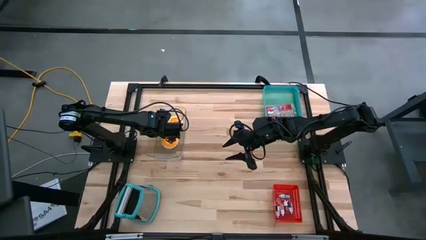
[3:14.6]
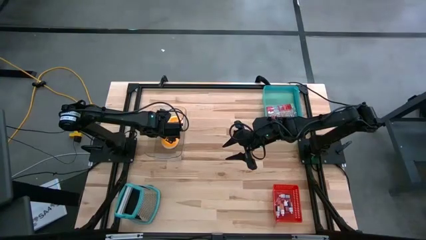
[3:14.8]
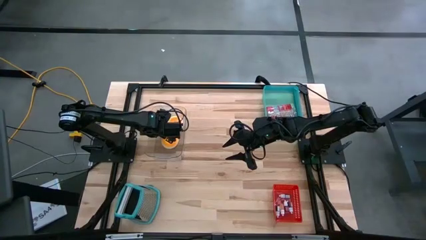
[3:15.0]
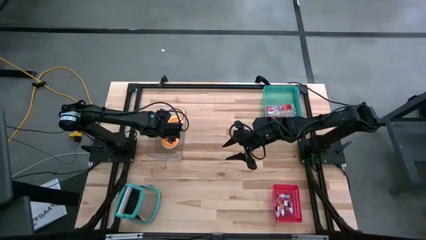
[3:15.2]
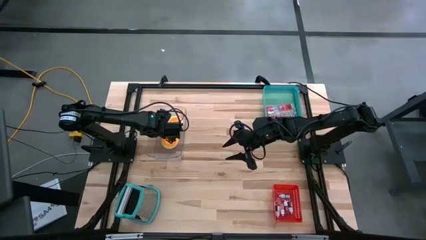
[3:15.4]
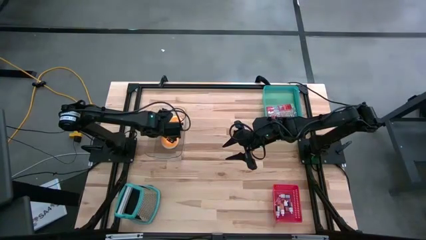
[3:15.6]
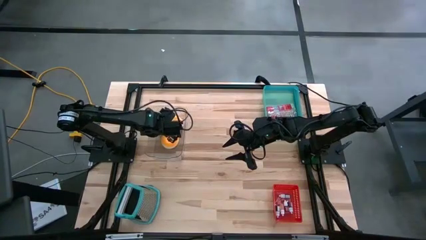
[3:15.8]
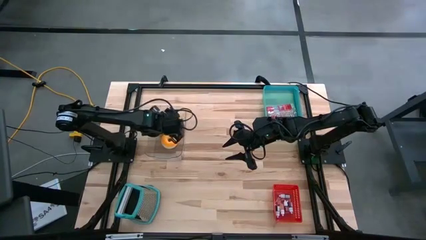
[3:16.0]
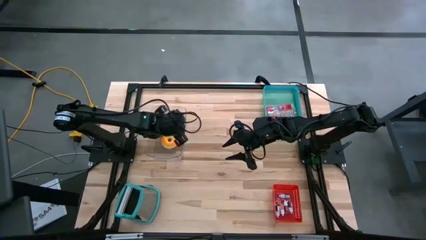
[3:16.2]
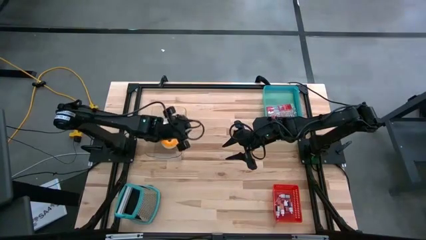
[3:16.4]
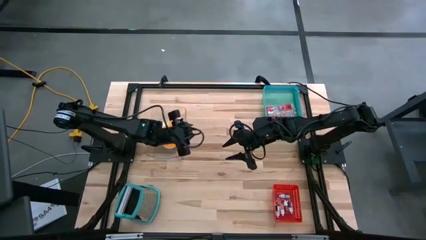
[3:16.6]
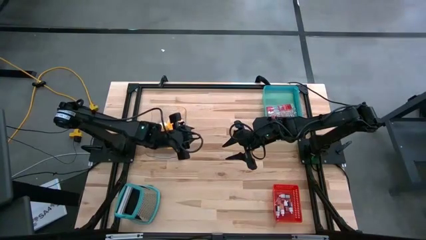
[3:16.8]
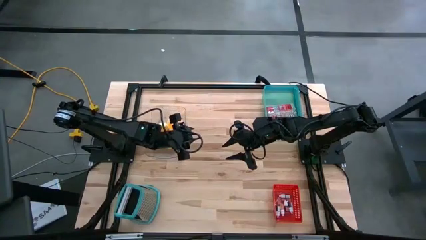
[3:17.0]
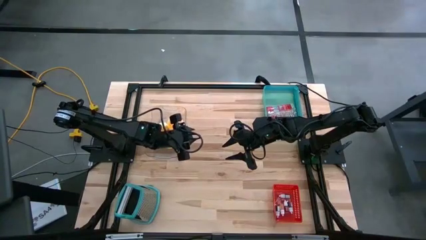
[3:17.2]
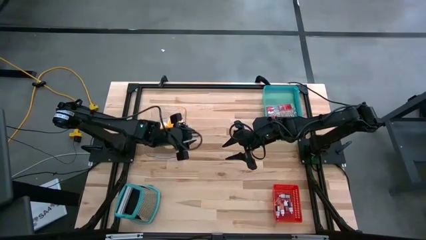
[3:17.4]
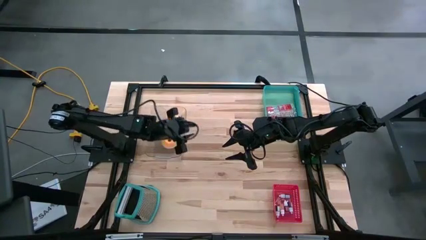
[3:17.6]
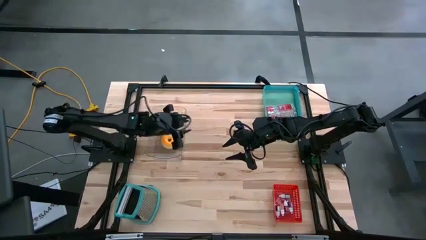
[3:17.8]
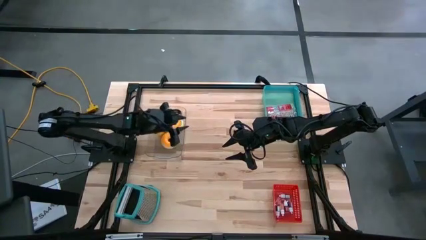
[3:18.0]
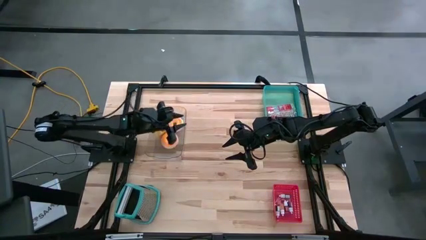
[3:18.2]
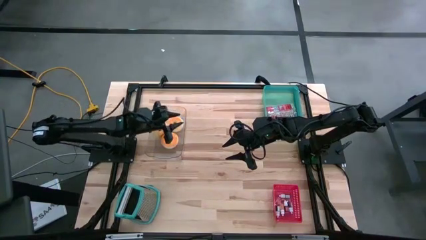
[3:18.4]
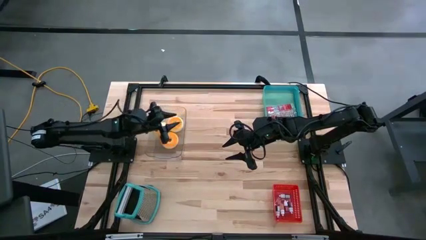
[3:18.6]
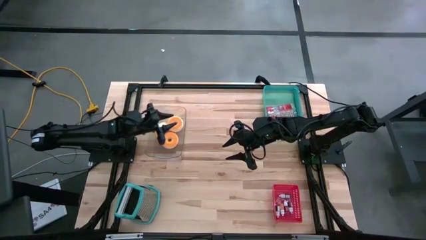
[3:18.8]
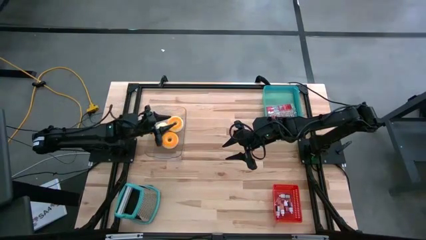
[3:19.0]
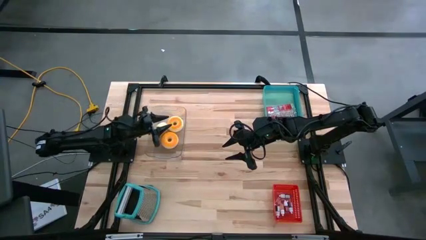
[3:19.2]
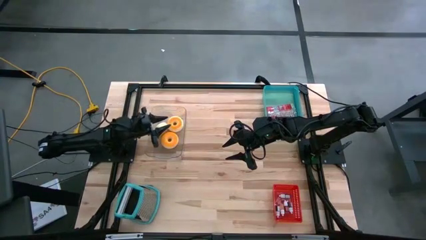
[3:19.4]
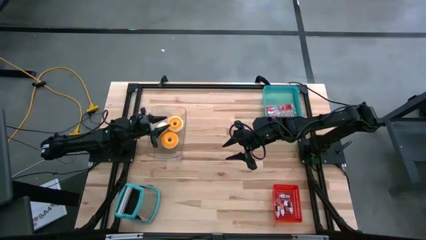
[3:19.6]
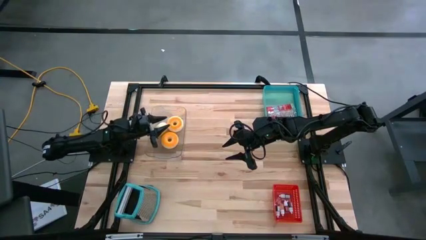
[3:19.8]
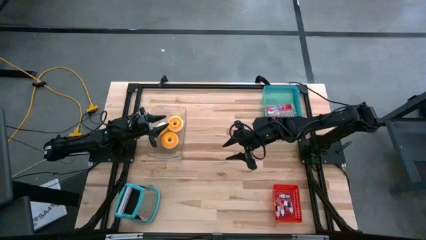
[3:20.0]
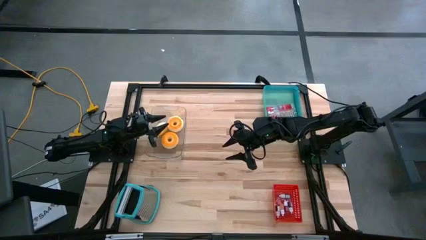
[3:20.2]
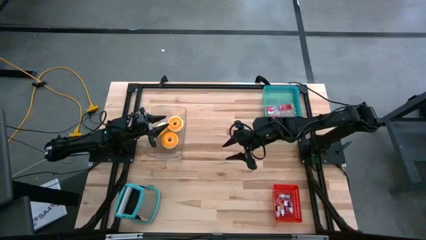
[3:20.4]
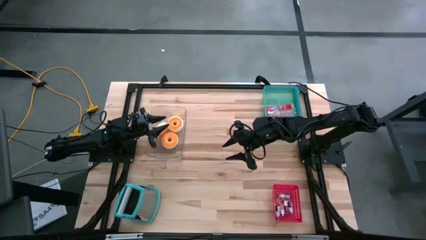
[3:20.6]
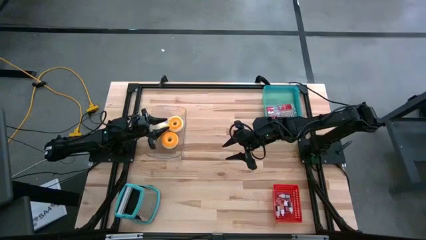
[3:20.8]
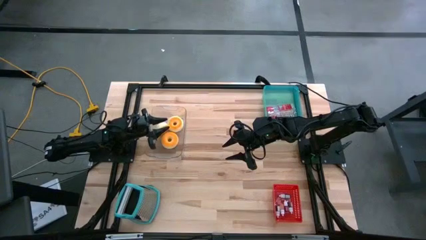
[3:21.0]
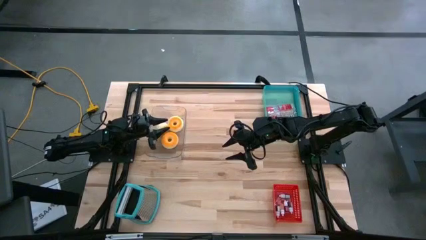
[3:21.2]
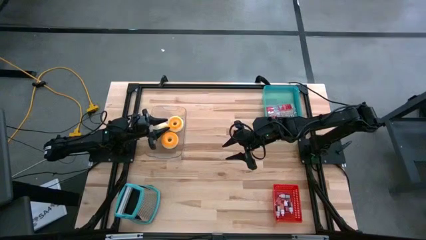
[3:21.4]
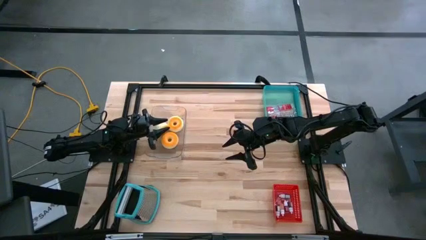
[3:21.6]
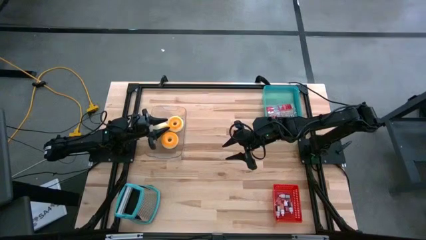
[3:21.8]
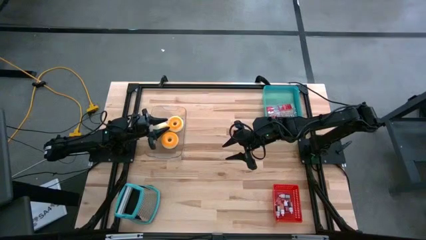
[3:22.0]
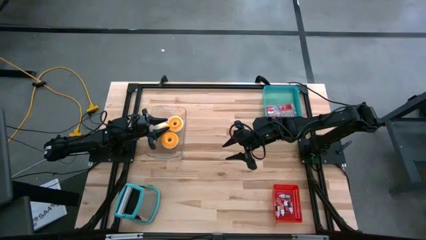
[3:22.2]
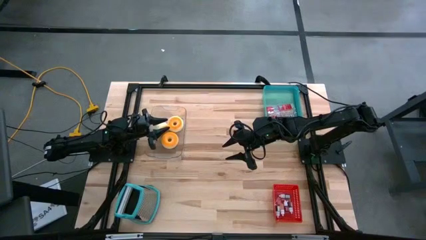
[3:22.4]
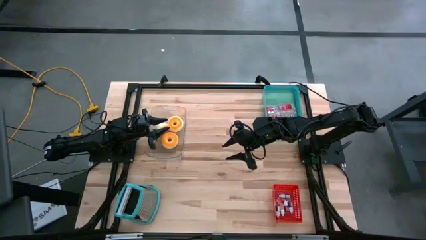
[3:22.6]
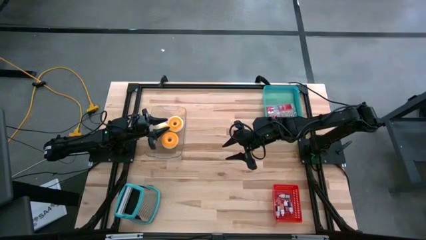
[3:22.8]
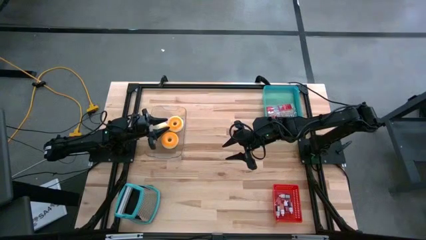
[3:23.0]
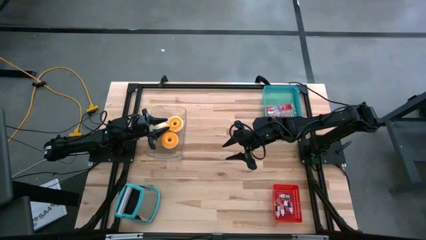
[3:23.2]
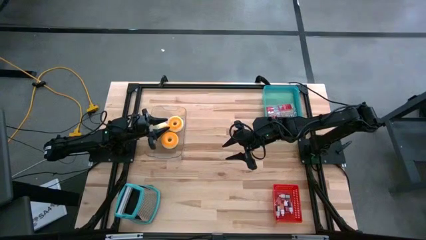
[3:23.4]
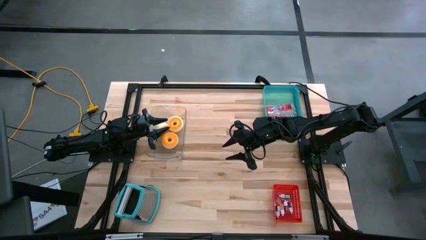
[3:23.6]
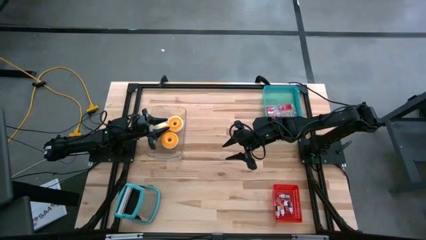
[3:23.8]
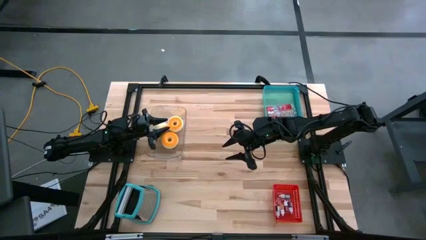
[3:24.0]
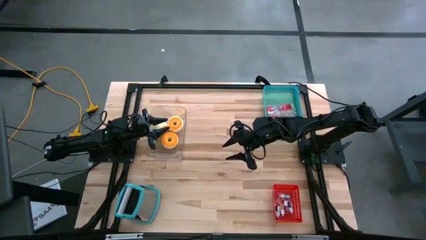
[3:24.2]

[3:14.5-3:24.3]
Return to Home Position

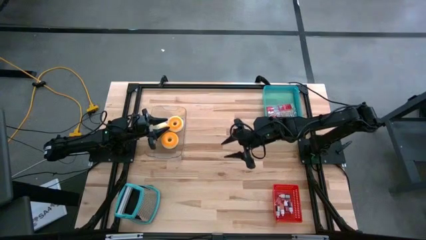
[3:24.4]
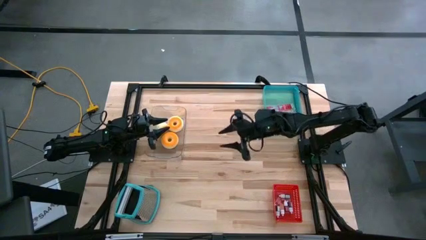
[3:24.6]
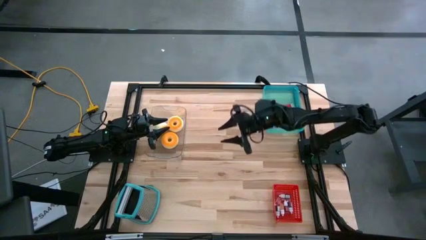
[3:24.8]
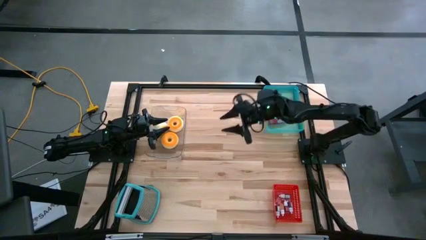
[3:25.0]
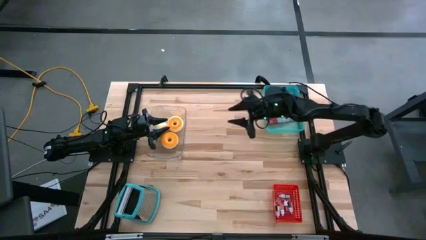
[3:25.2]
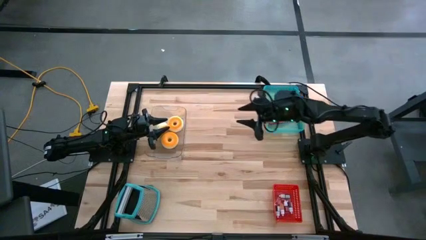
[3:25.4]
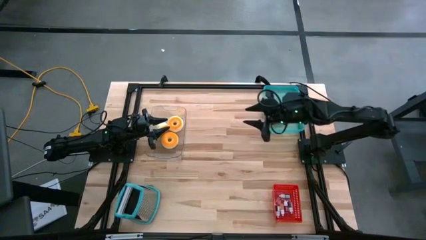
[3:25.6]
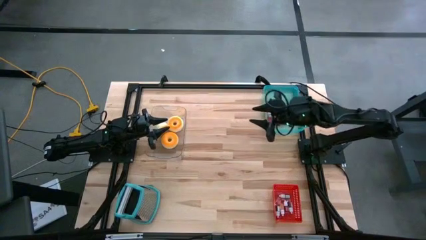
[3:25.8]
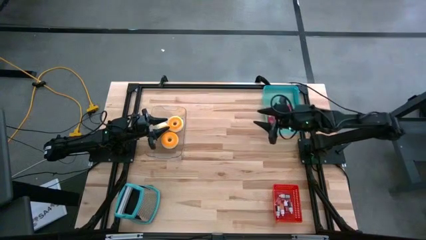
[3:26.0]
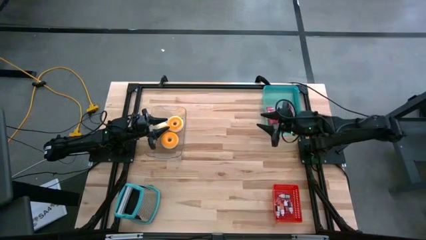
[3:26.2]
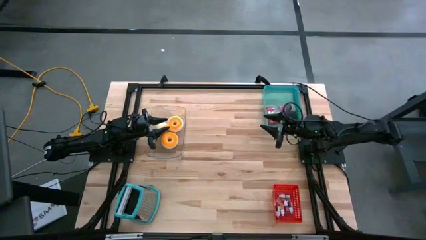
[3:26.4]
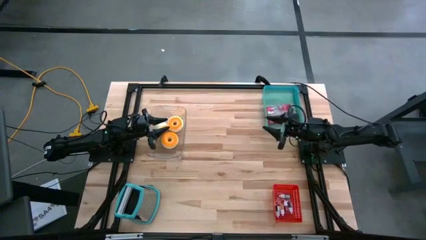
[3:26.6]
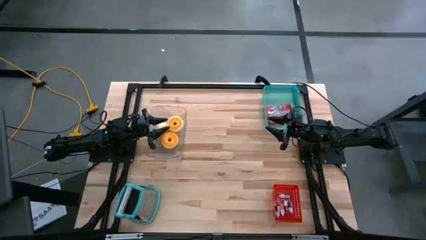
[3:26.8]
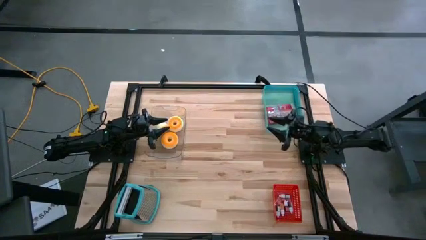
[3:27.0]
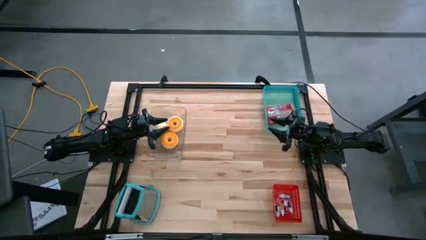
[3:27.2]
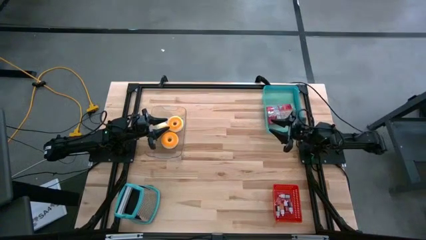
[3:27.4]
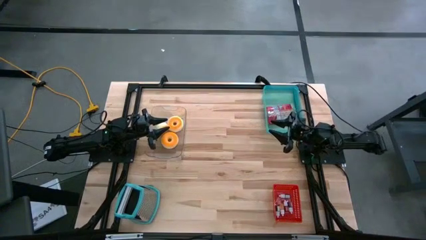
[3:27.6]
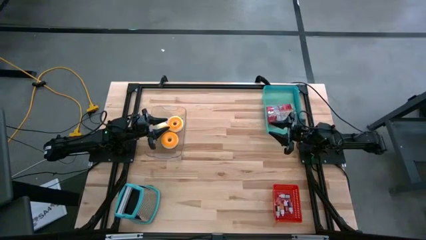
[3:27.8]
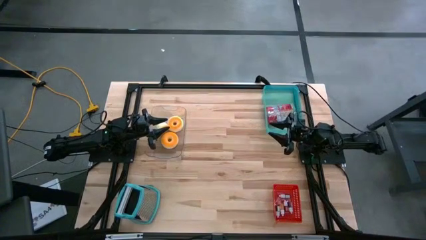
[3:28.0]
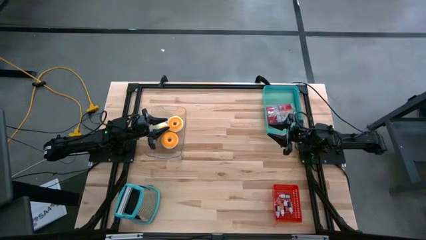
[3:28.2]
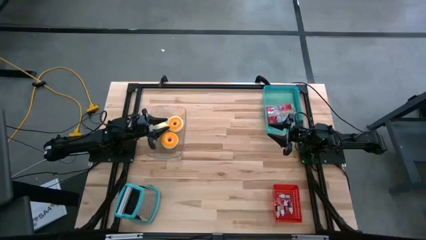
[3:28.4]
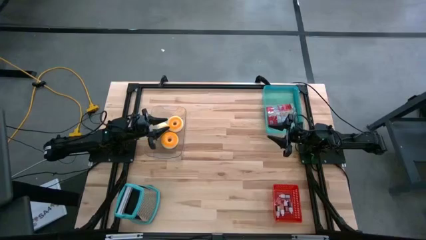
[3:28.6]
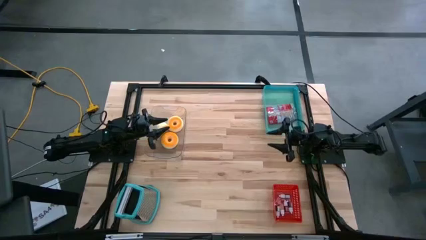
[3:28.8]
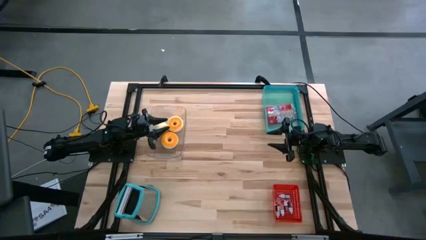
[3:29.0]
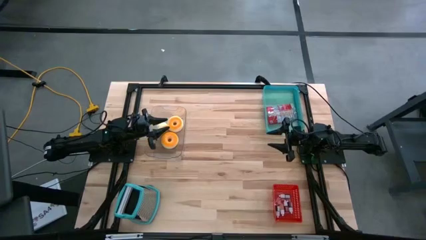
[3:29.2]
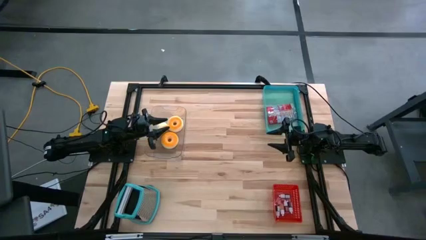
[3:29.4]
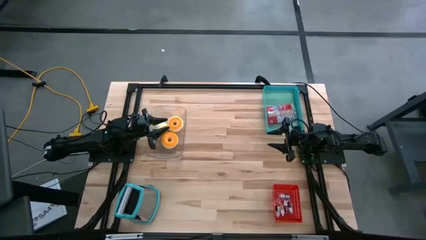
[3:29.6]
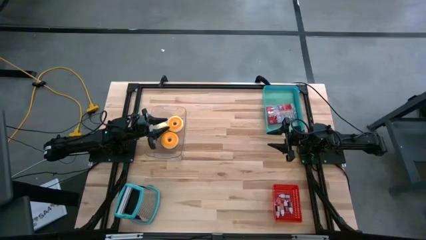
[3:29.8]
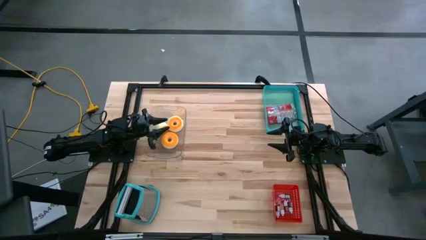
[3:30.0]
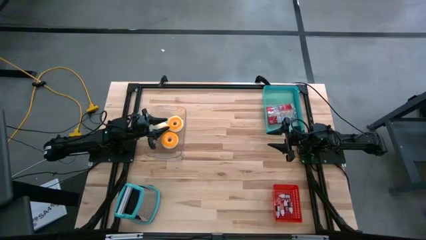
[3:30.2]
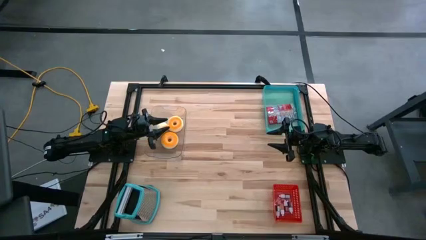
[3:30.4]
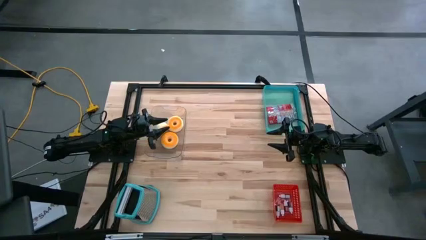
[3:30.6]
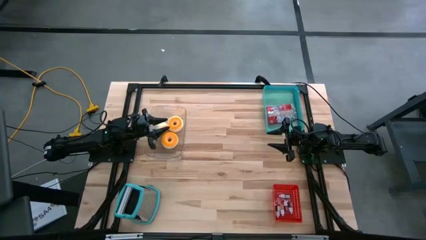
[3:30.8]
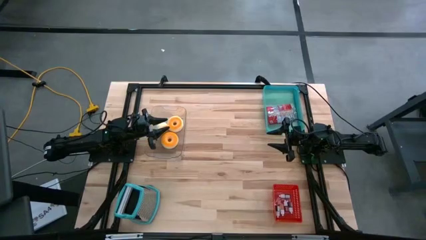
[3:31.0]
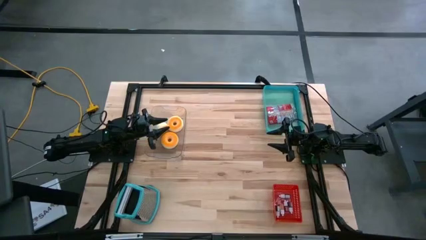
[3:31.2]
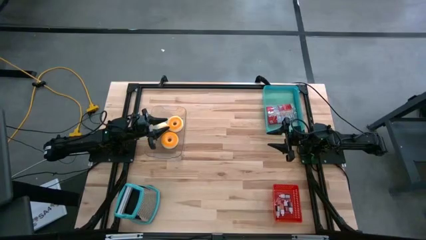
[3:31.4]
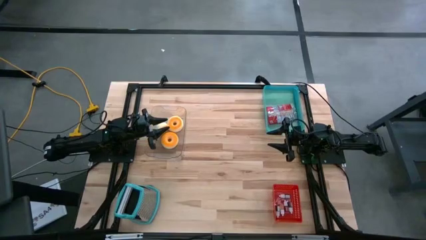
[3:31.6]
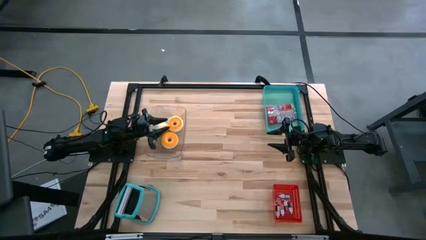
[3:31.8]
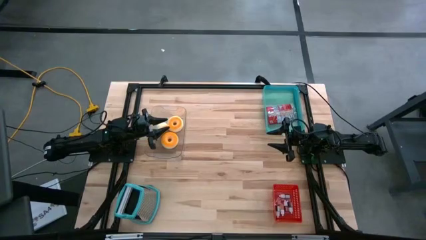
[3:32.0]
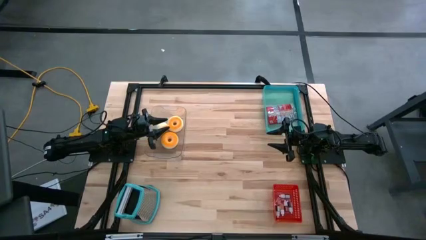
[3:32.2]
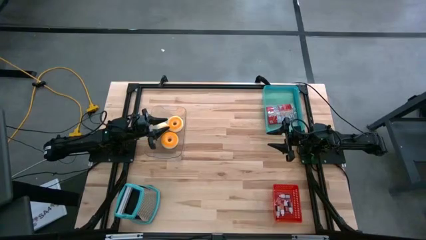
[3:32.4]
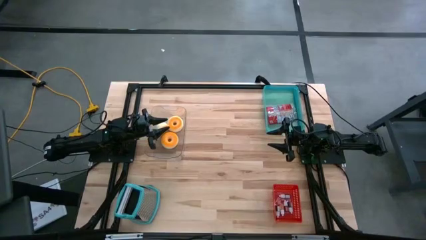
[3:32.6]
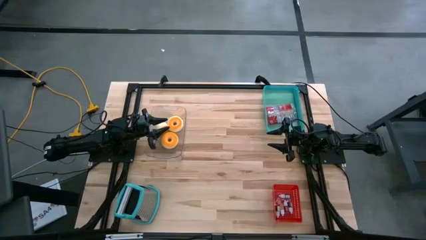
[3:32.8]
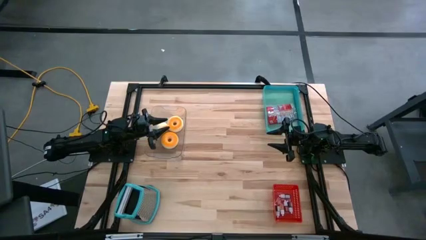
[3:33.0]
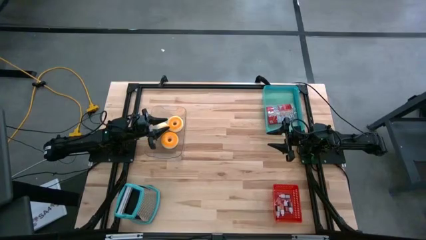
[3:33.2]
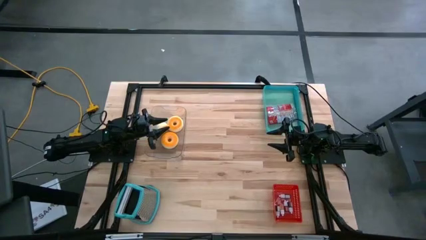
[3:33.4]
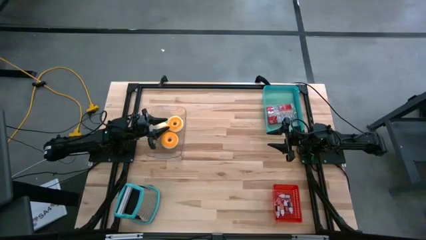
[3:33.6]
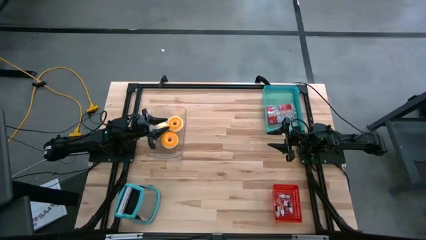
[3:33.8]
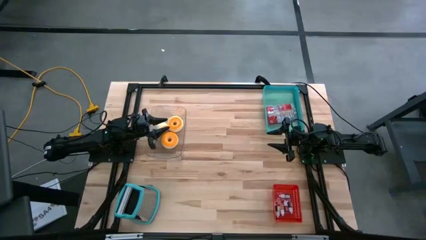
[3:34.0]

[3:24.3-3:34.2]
Return to Home Position
